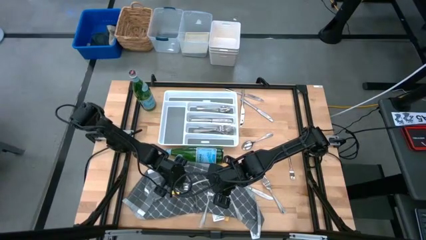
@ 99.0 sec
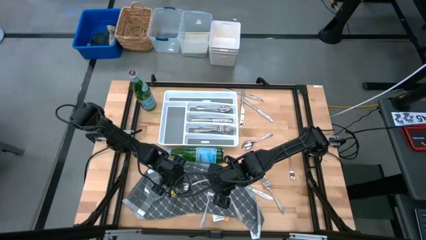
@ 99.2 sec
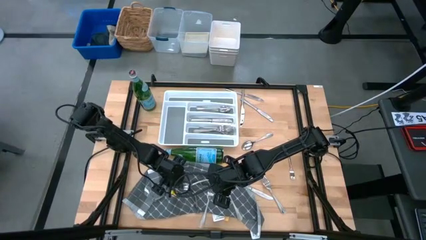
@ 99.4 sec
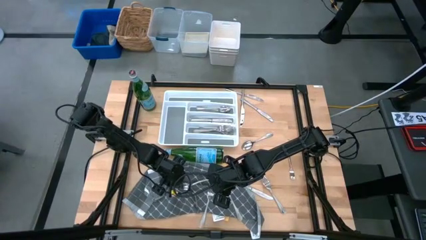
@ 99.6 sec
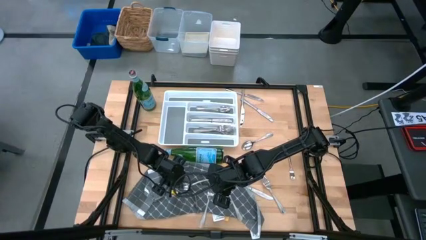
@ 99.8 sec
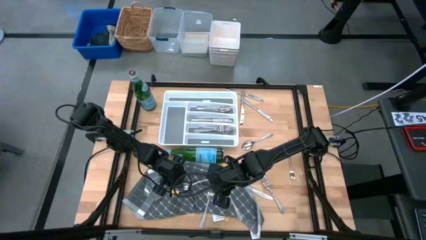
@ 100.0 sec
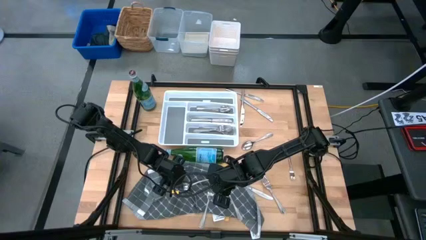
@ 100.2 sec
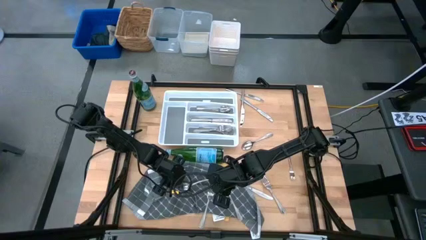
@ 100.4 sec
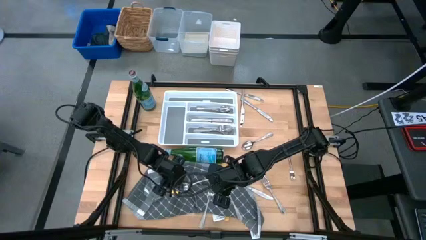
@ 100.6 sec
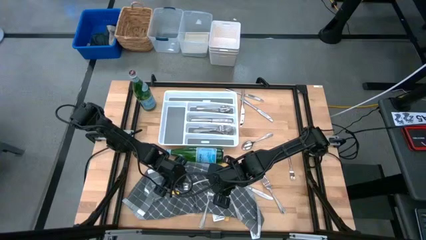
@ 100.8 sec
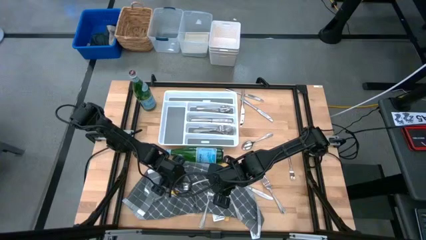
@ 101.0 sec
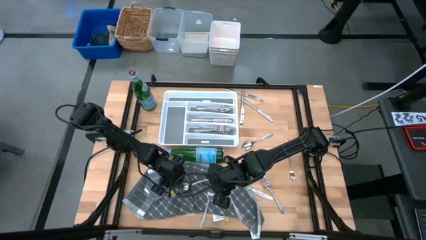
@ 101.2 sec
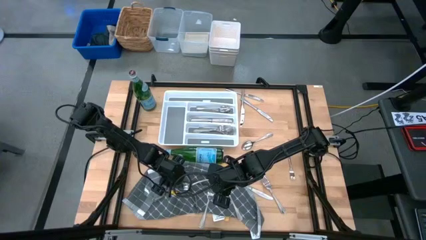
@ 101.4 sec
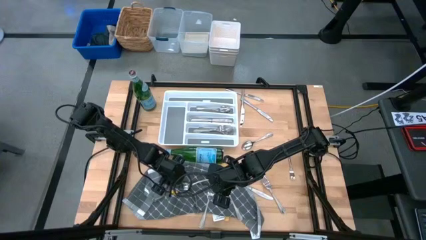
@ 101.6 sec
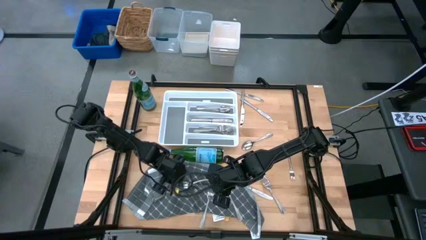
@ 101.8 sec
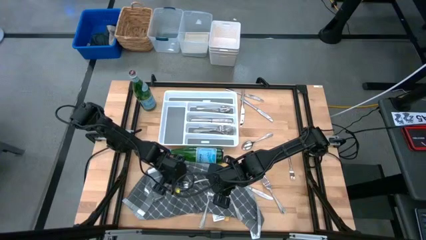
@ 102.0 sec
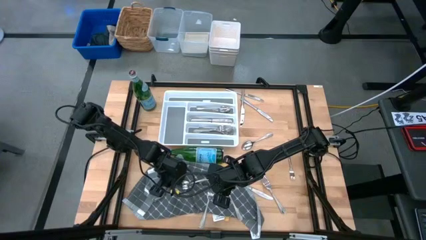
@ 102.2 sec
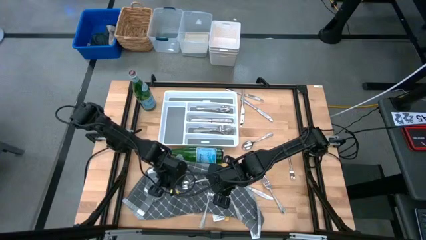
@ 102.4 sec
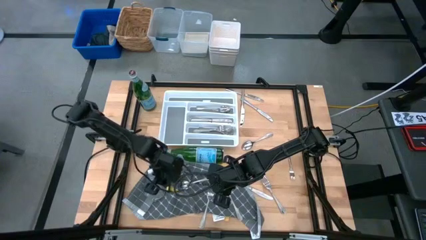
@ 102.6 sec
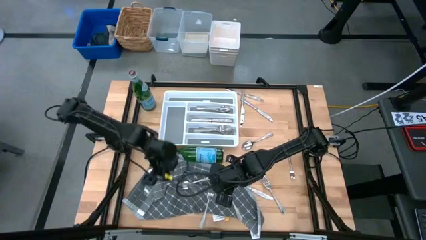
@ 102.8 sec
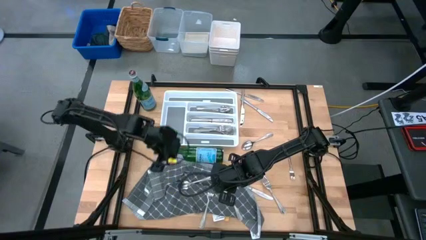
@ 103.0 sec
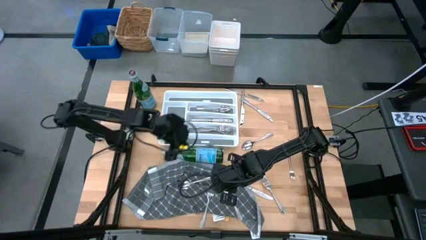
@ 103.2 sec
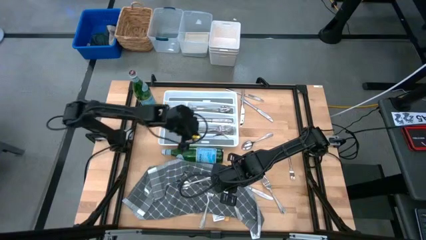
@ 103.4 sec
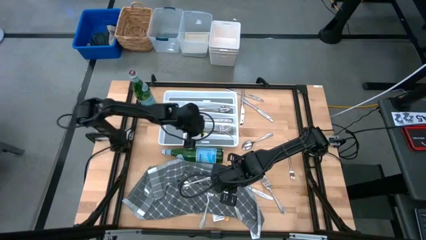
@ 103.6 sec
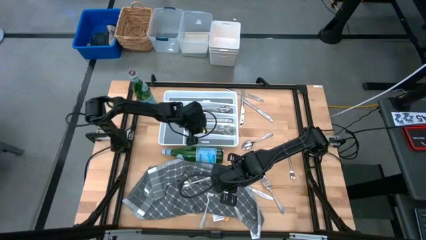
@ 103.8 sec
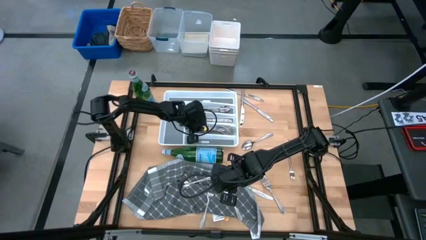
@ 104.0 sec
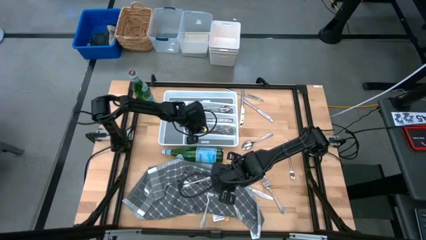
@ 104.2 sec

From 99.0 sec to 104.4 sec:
Task: Sort silverware
Put the silver fork into the silverware tray

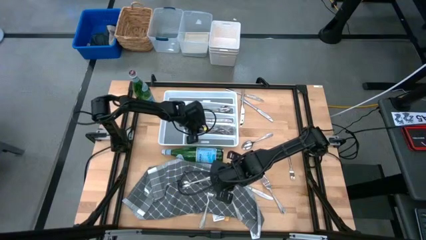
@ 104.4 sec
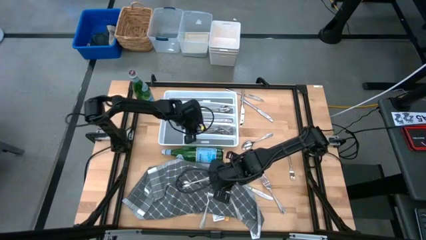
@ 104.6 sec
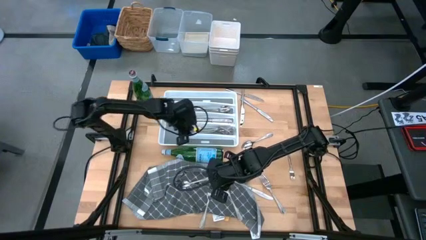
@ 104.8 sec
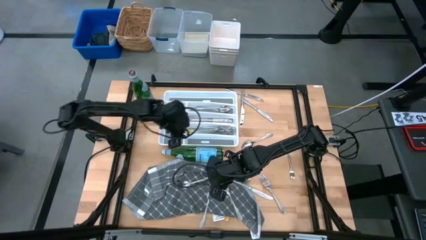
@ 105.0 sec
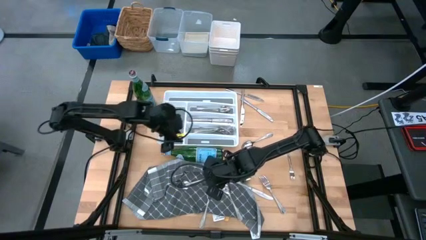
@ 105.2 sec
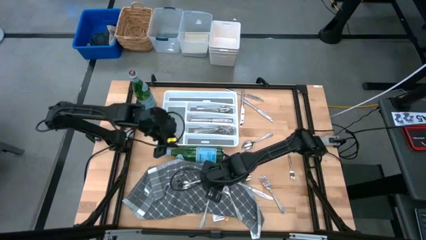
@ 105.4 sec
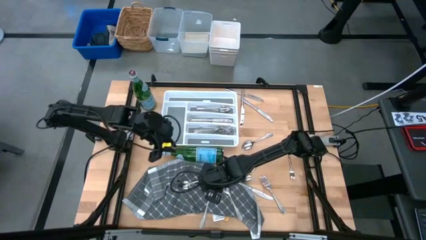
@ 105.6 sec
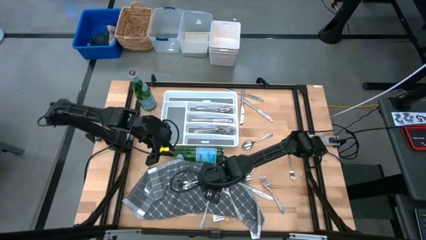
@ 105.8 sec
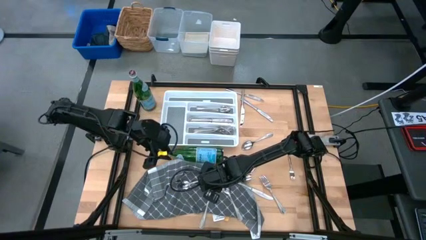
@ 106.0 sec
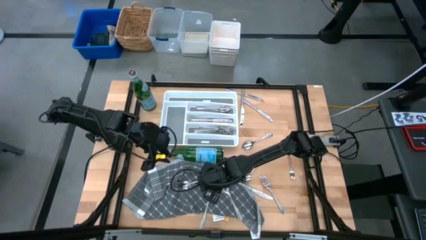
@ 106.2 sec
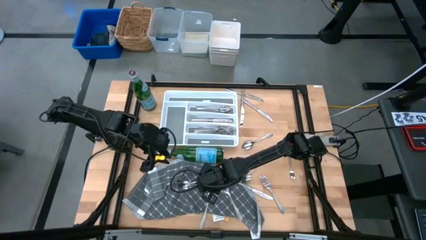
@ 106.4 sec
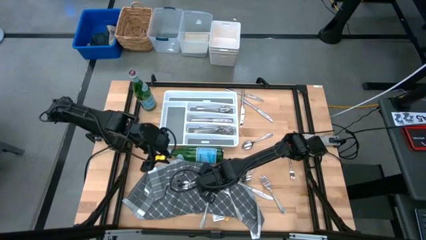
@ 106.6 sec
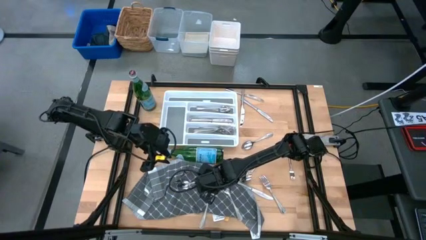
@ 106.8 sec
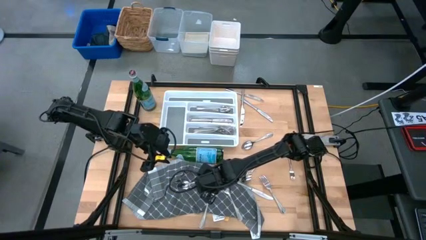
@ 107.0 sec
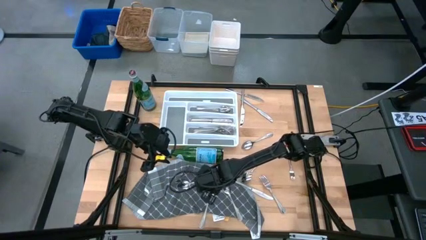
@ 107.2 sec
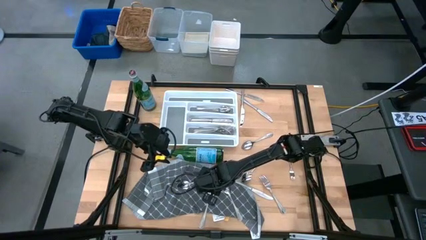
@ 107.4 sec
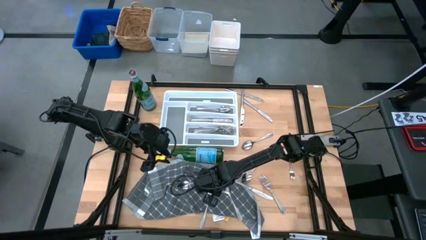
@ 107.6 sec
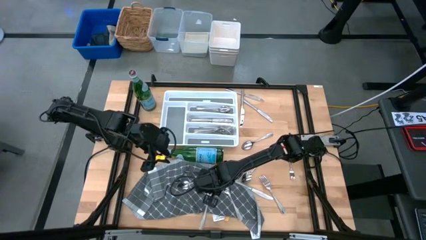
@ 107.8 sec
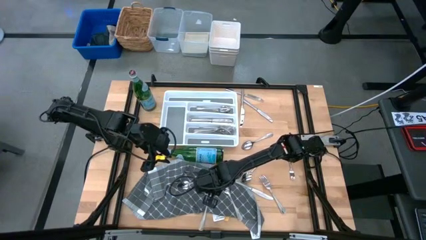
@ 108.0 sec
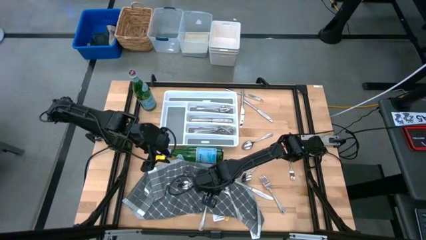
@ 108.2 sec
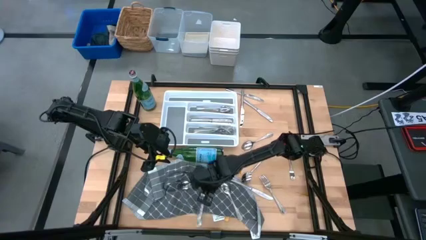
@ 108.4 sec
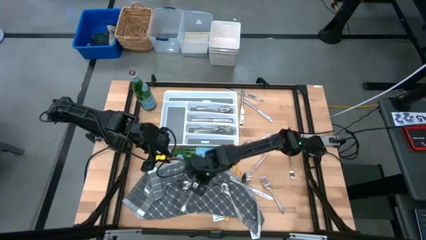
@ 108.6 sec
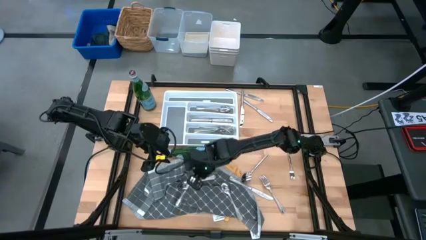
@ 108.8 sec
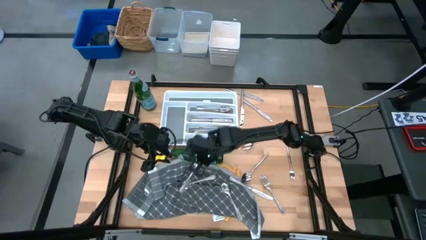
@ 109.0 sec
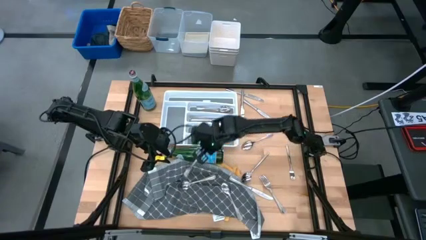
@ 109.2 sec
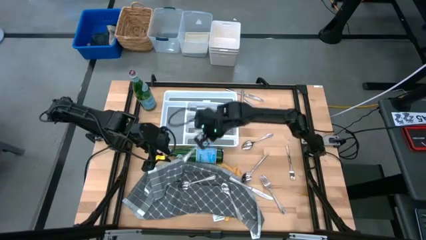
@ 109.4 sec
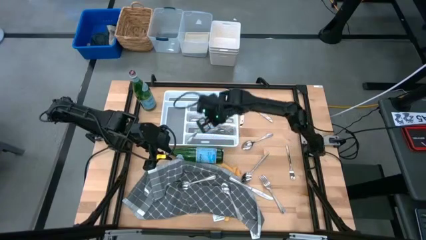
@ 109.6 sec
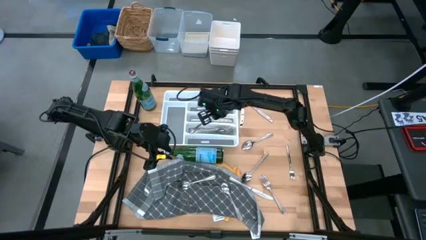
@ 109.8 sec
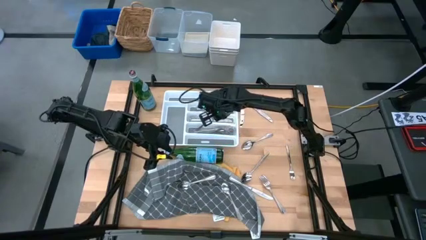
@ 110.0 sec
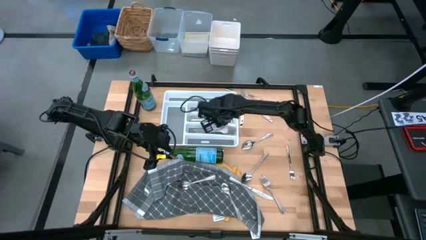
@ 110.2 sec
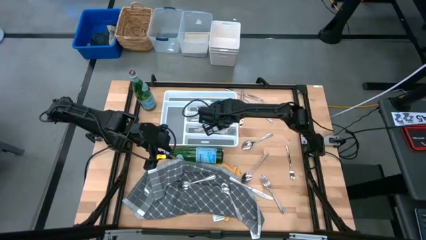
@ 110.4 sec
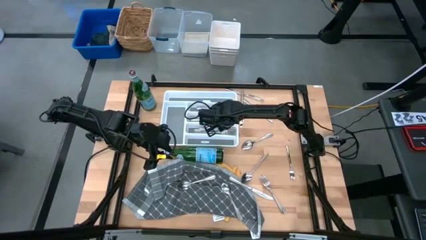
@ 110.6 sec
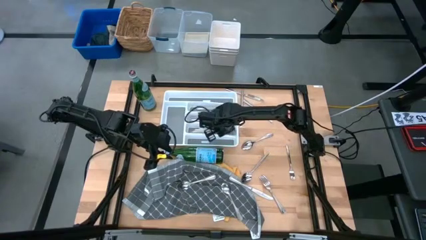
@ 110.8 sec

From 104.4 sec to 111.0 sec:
Put the silver fork into the silverware tray

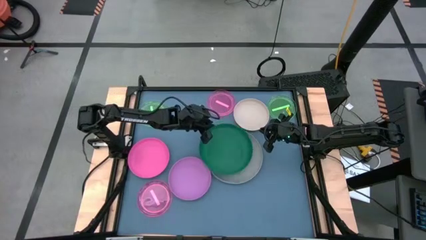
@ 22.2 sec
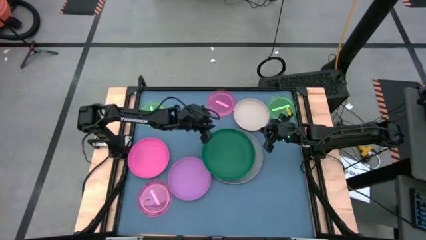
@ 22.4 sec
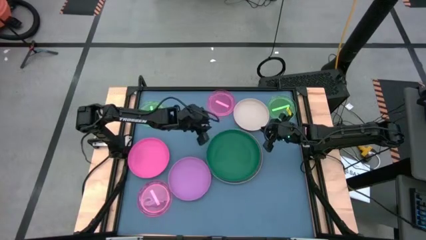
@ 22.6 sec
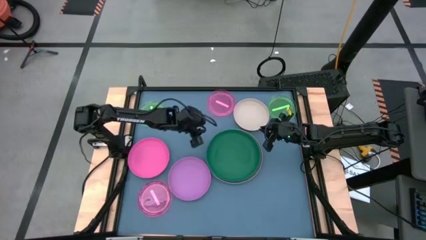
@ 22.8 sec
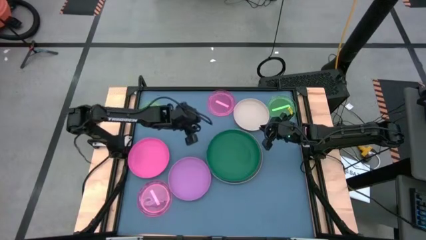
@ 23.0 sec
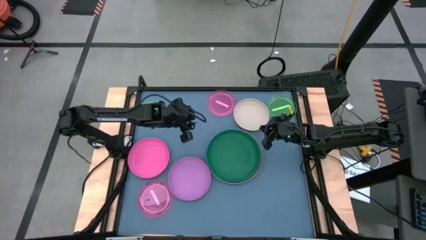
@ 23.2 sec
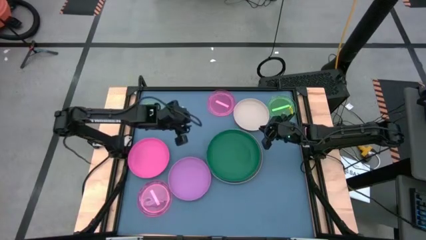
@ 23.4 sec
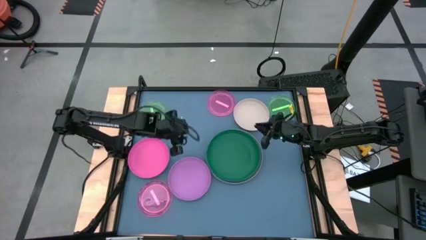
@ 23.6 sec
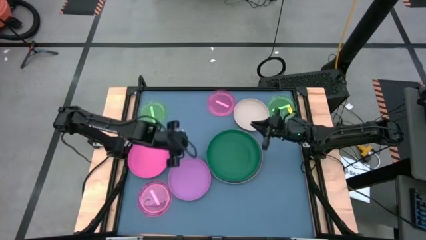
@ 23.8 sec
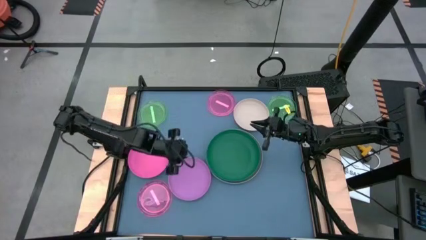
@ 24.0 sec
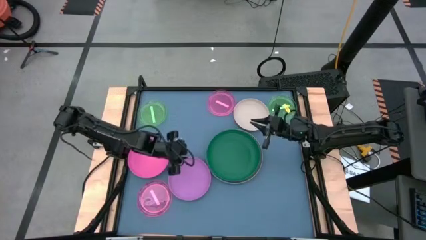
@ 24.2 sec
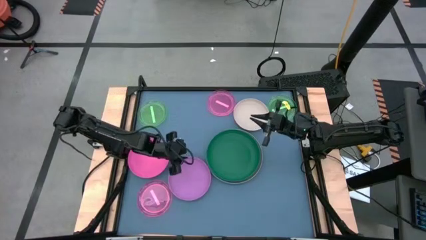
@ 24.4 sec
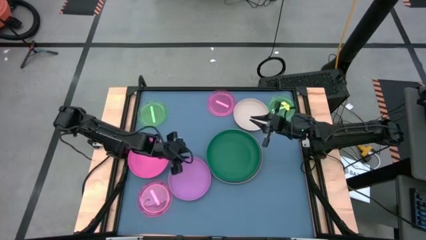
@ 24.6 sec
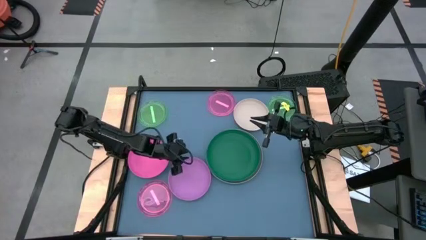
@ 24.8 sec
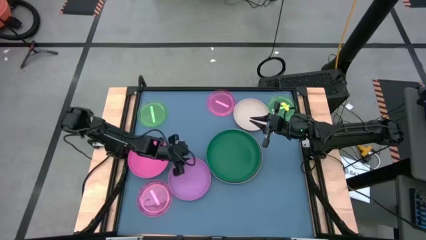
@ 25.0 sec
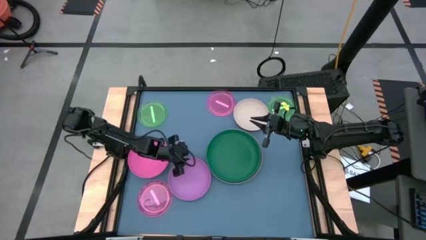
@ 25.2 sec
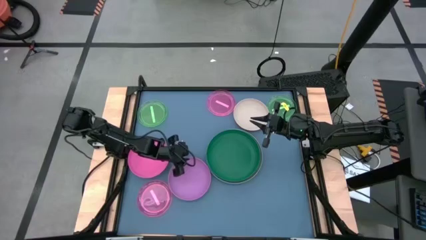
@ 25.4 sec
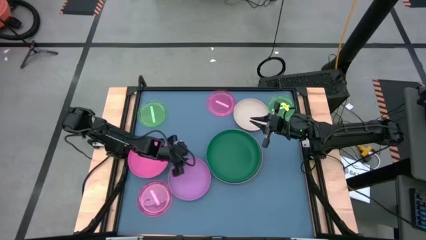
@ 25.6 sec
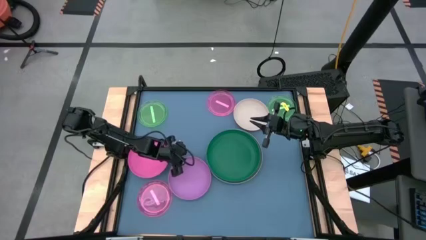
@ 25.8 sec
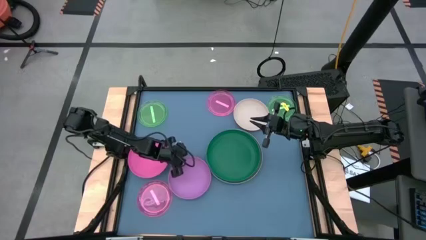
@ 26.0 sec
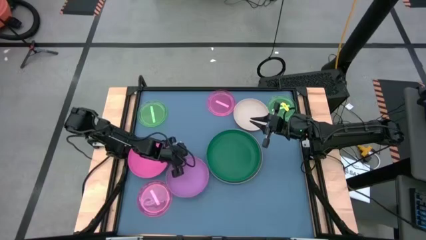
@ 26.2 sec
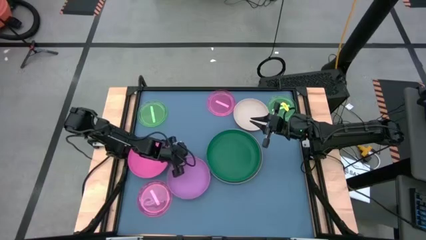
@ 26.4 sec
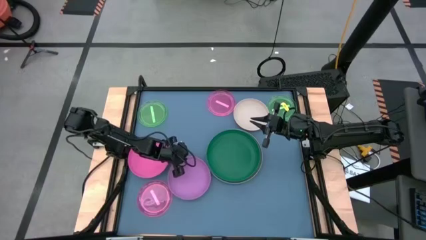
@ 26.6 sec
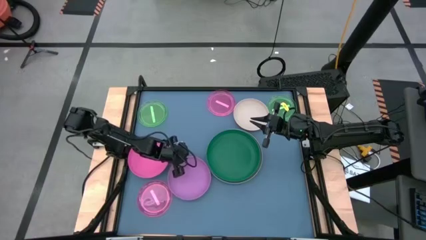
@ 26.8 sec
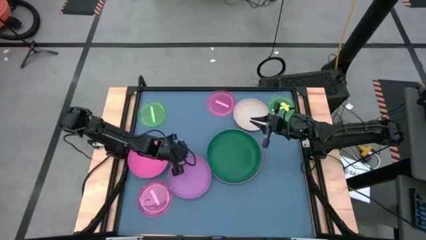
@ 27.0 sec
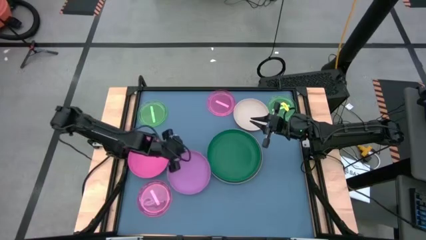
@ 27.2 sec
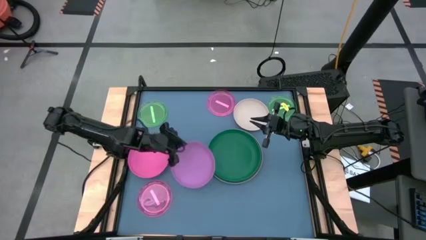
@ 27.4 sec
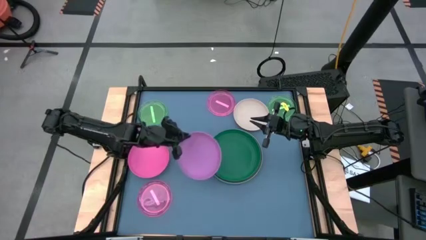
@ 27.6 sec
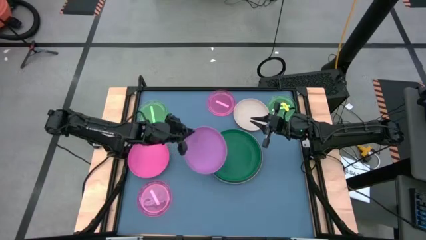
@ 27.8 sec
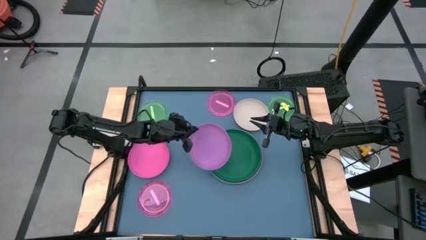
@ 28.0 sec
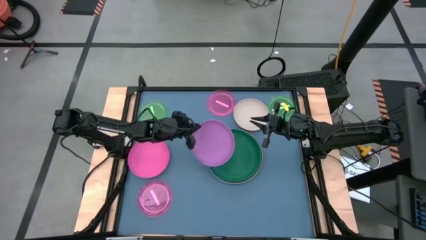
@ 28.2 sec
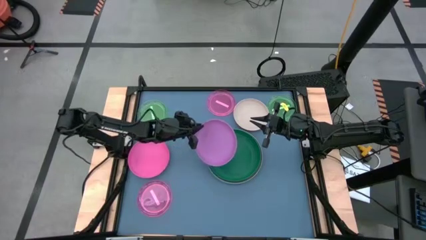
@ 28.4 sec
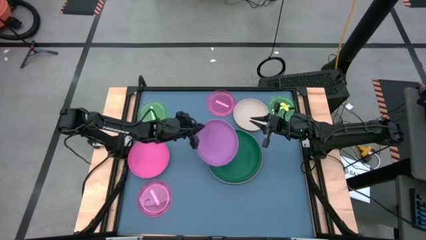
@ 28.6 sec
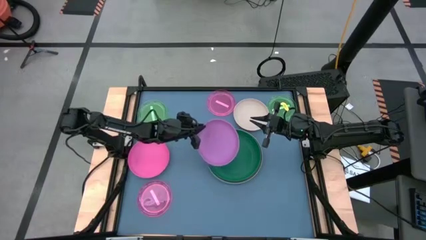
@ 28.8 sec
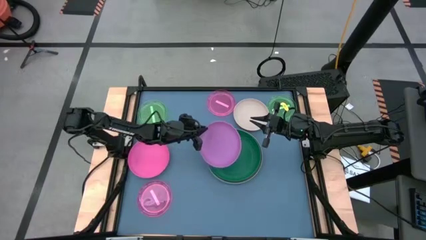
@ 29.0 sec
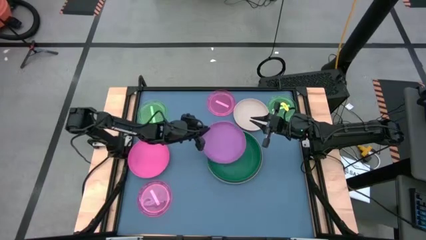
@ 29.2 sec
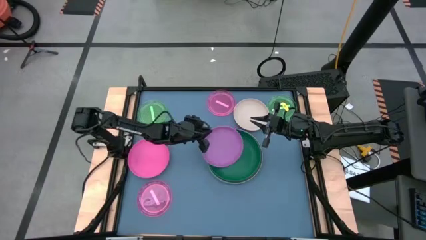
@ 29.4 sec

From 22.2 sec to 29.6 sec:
Task: Stack plastic plates
Stack the purple plate on top of the green plate
